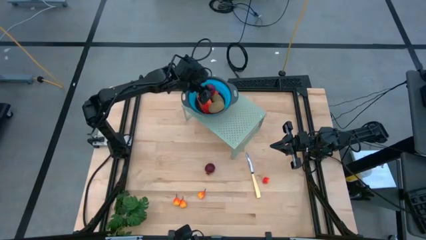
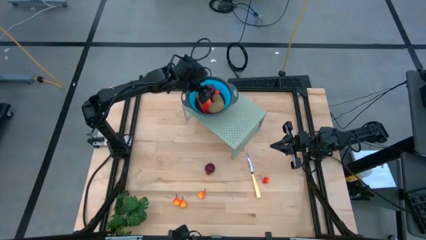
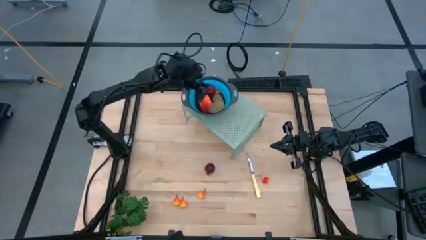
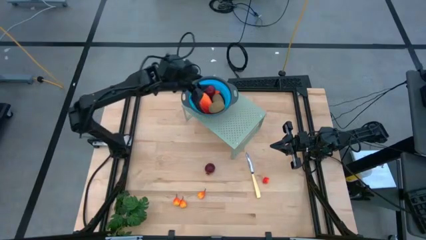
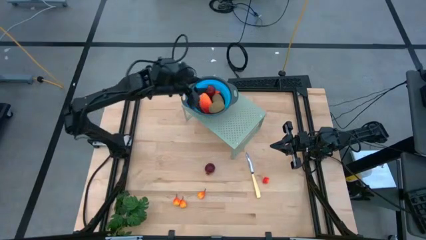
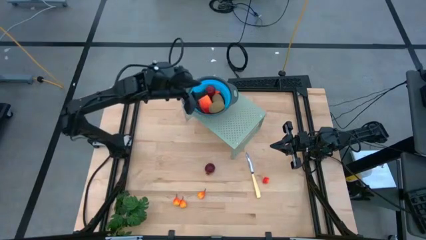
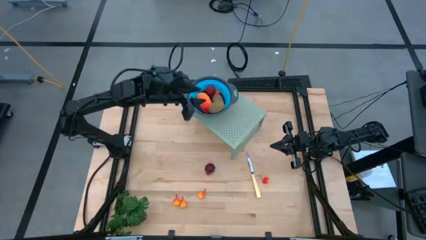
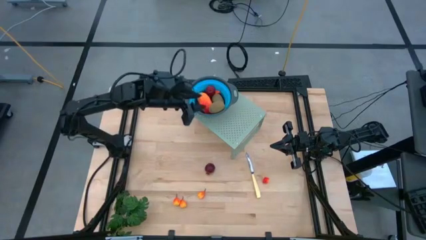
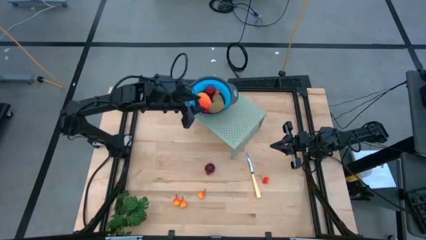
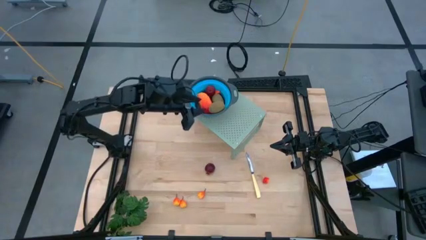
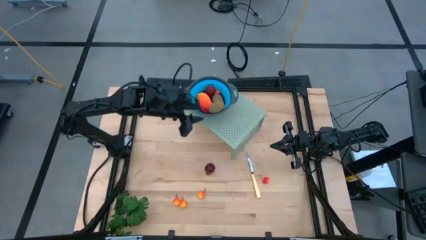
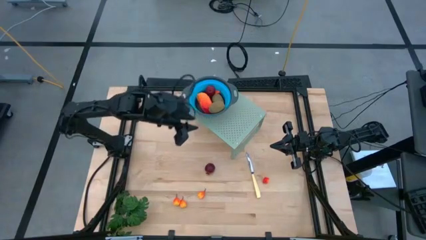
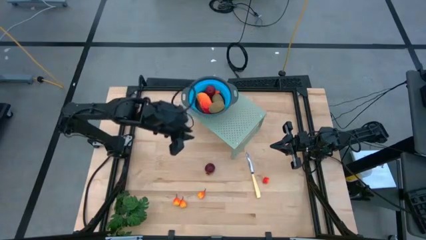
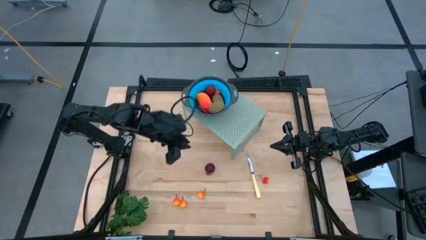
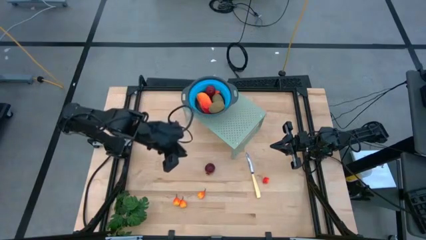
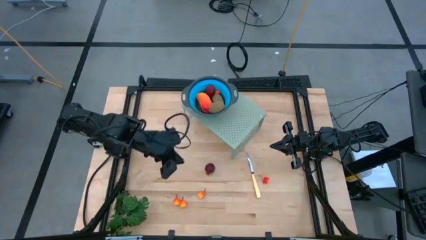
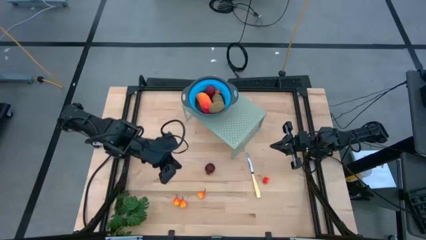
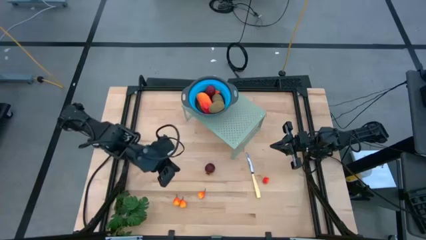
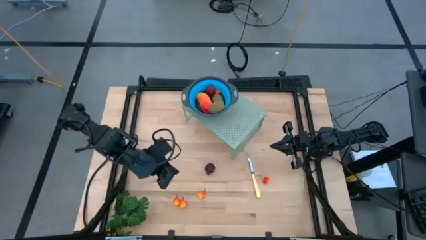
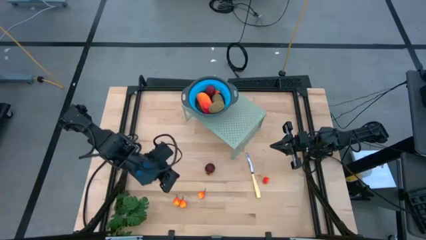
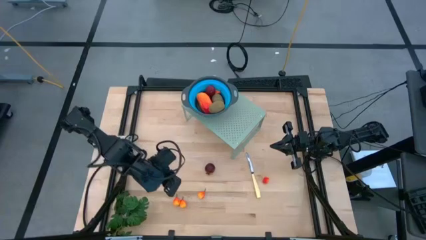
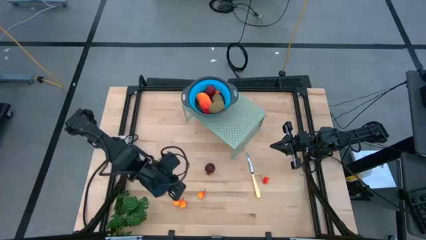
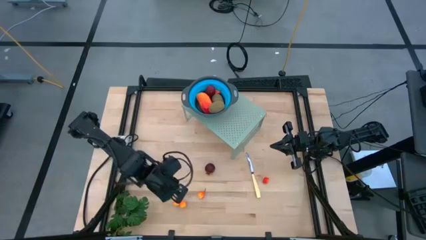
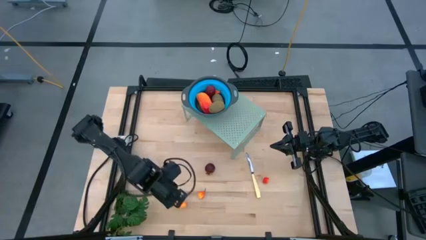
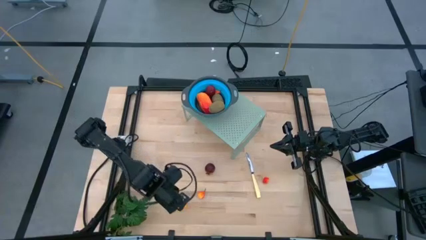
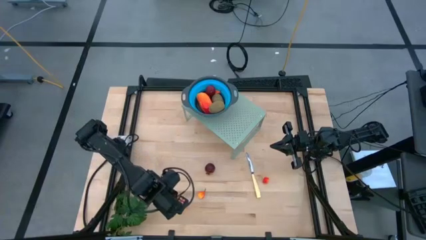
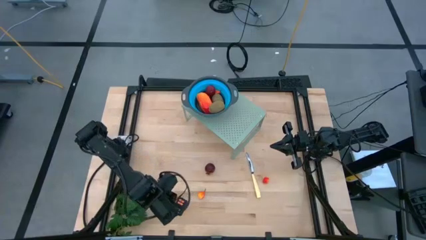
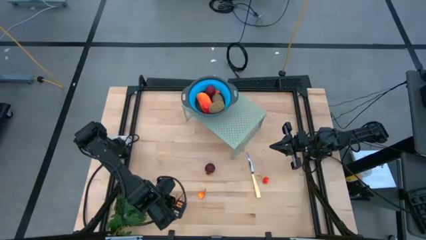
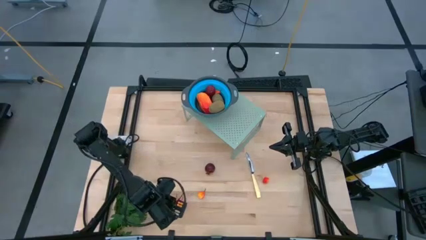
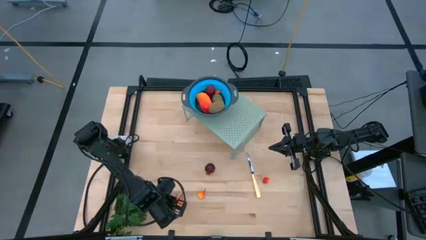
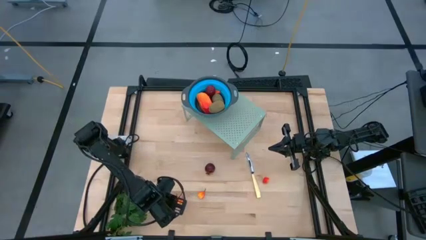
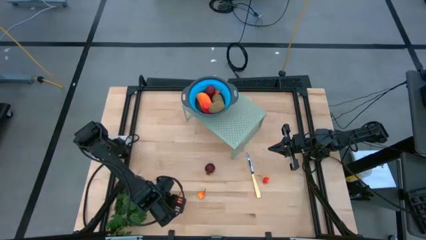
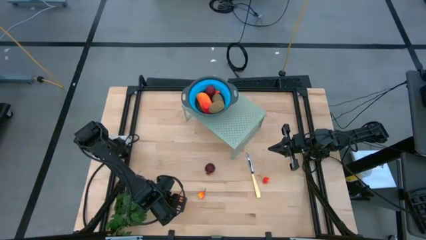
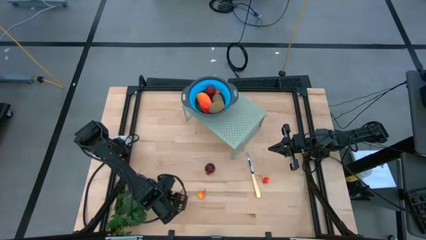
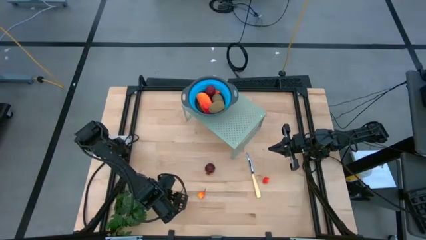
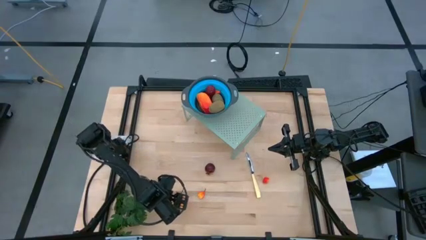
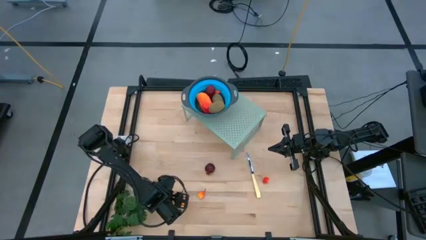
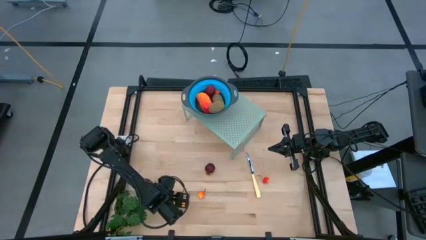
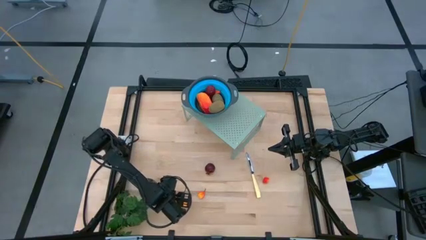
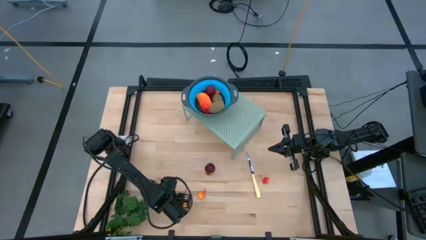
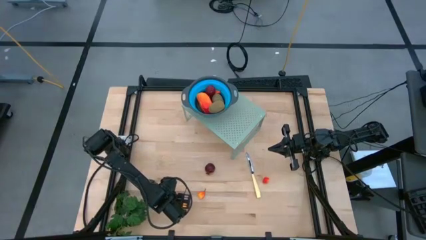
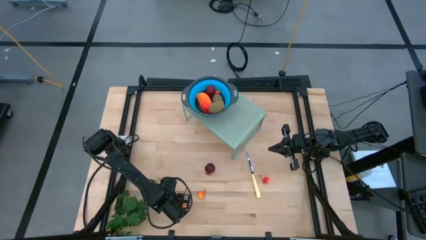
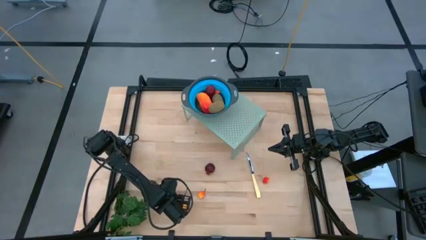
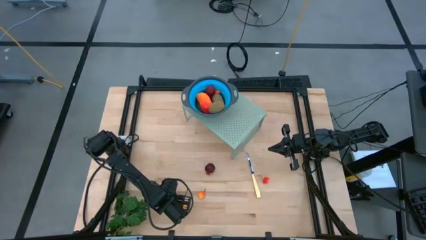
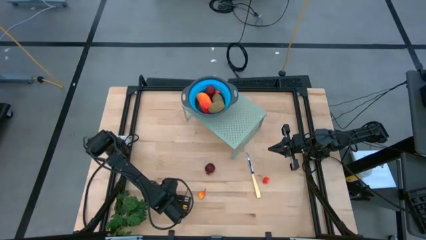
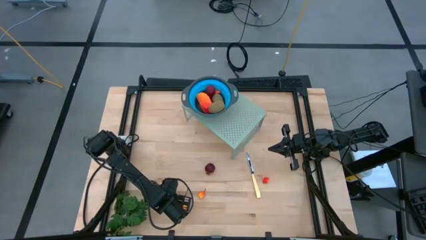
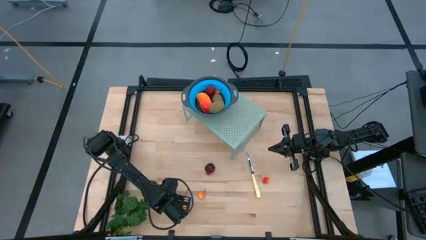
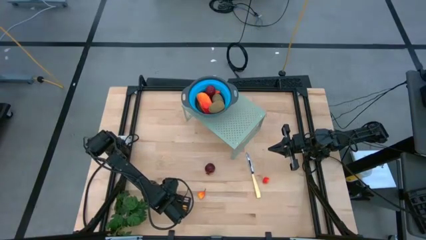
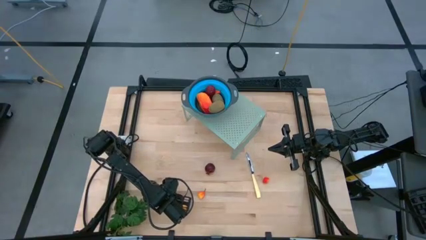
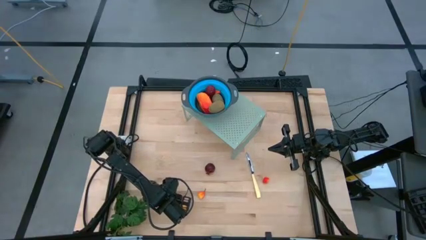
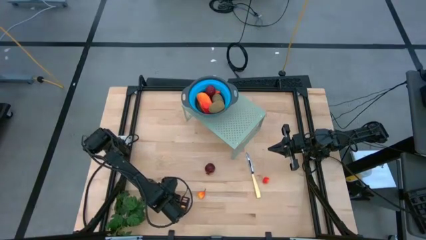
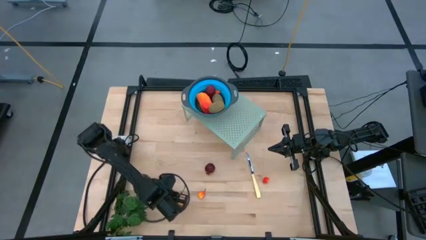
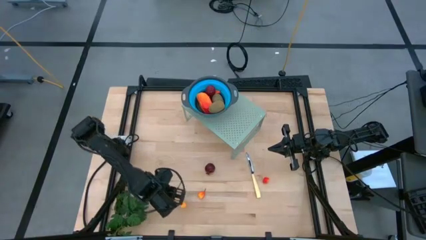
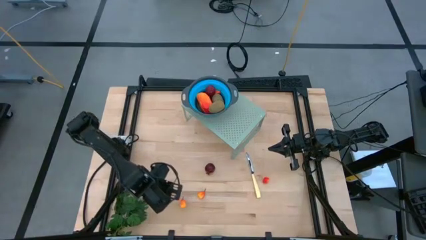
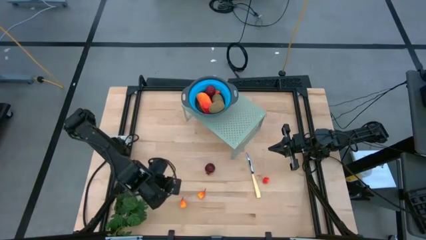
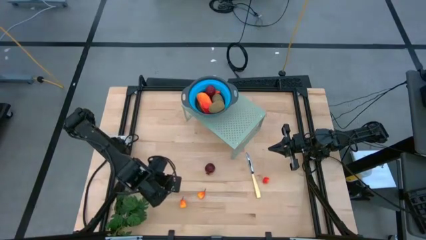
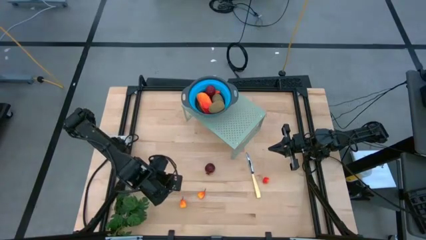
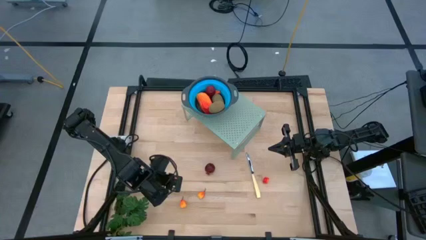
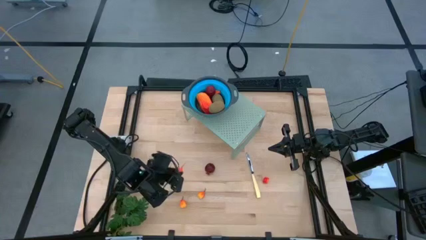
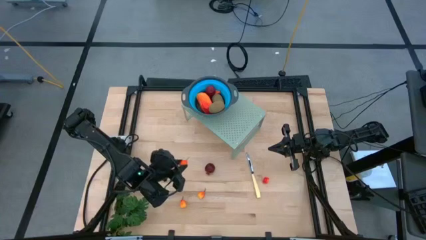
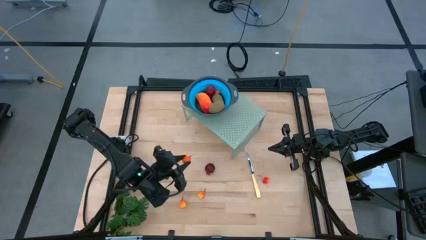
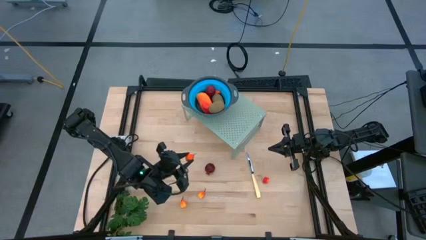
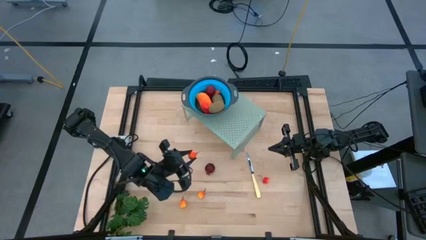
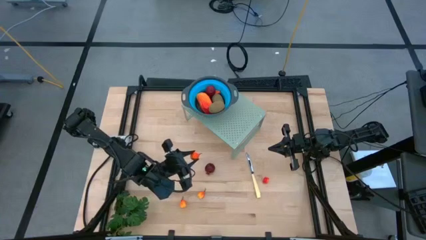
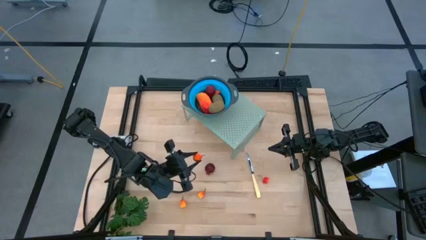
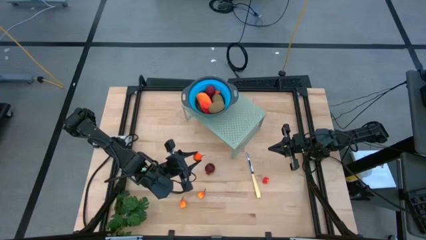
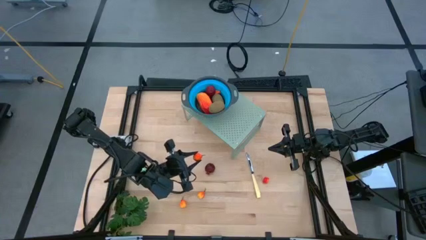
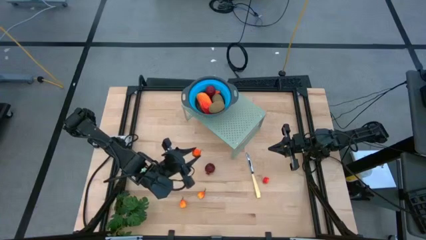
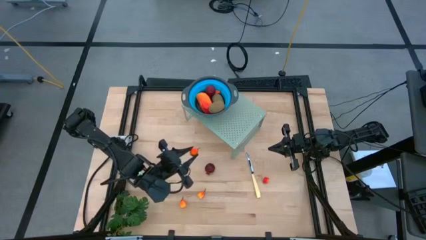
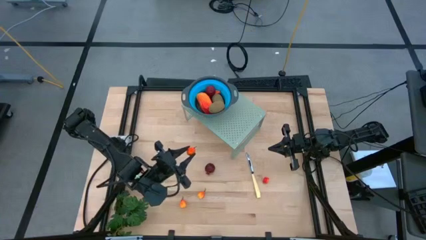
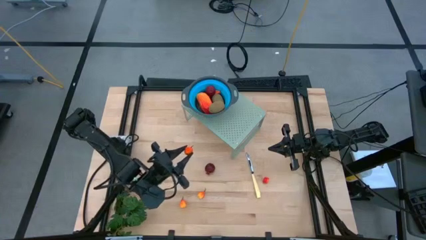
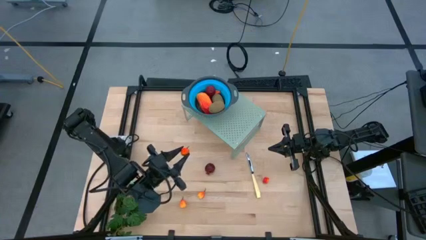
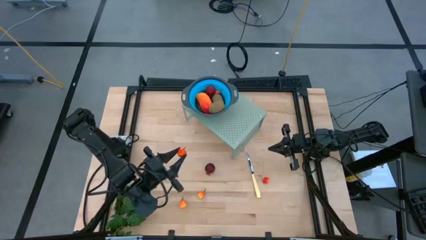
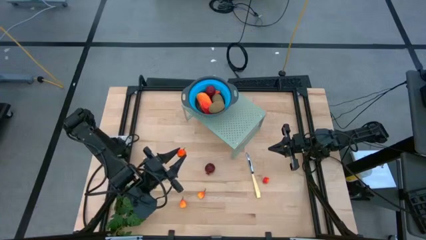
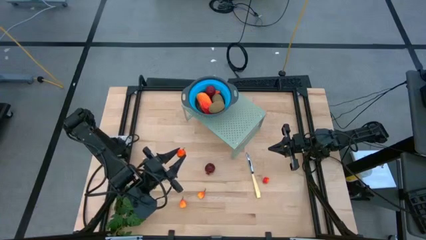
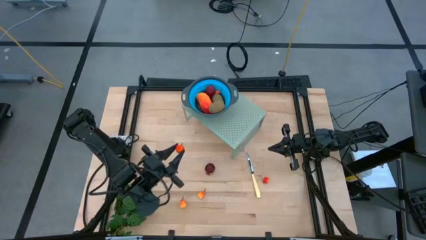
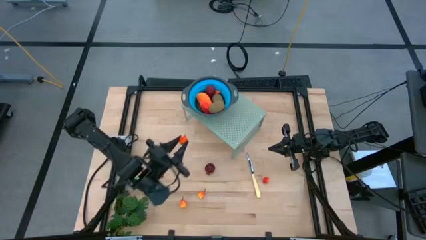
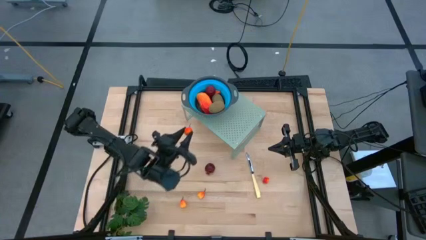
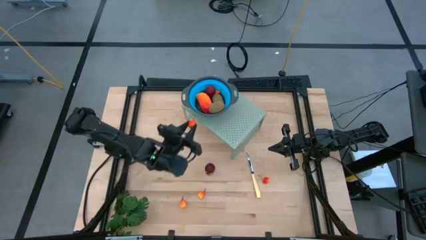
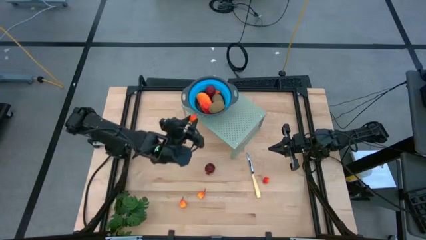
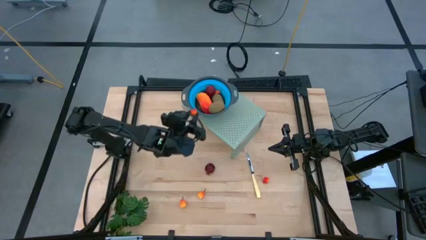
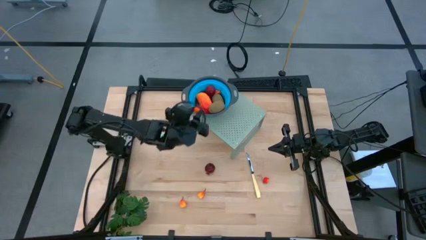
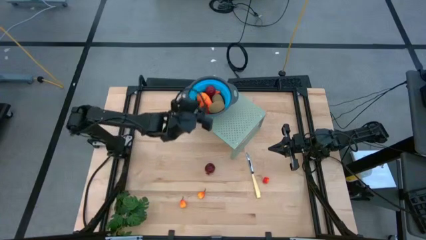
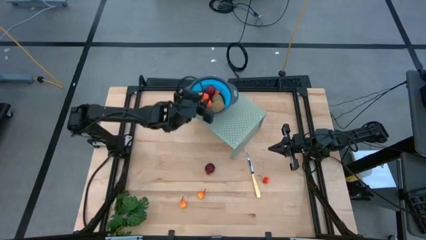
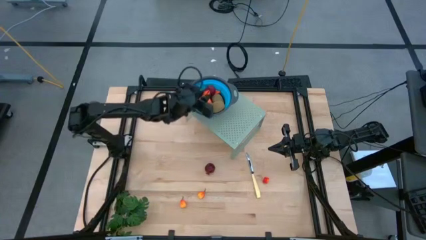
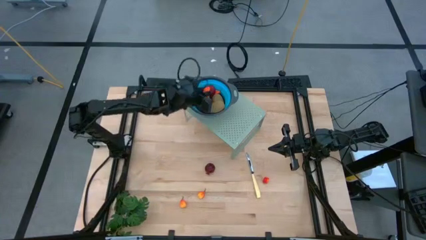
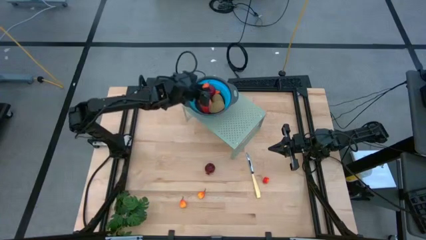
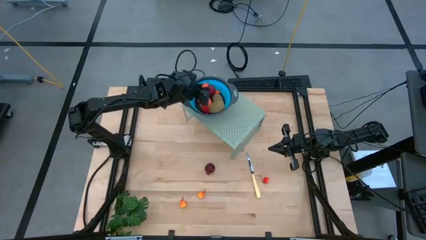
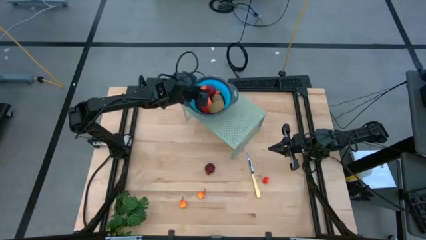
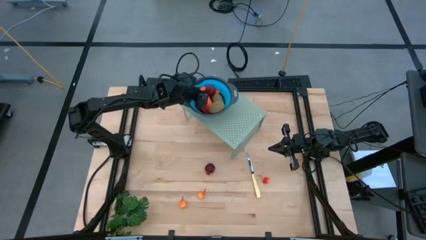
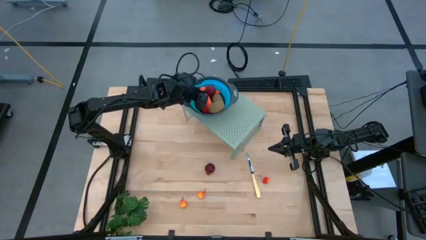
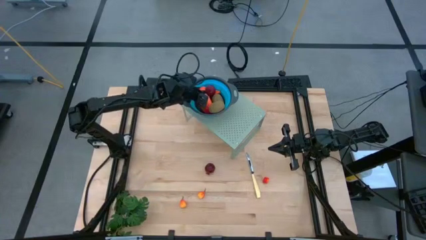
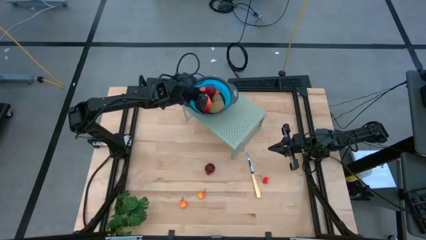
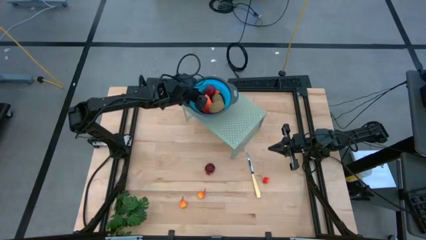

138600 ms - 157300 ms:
Task: Pick & Place Fruit
Put the pear into the blue strainer bowl on the shelf
